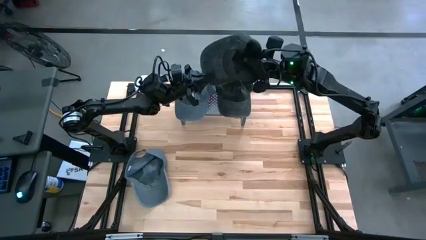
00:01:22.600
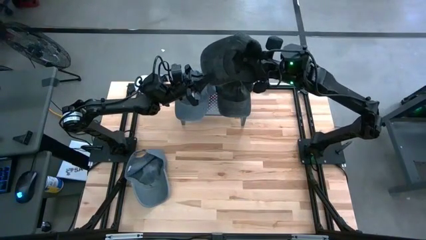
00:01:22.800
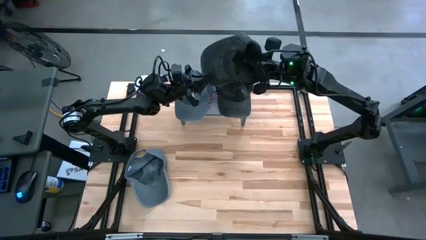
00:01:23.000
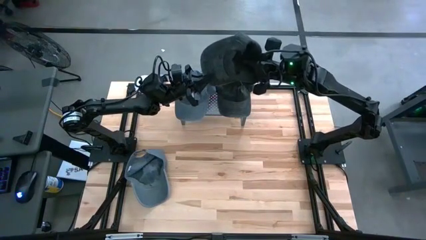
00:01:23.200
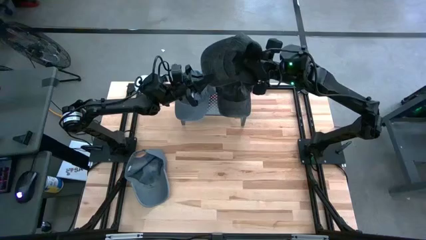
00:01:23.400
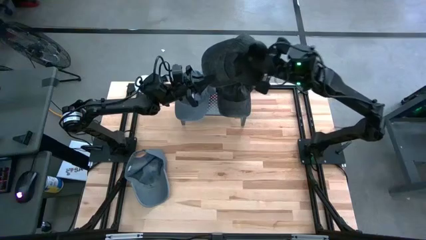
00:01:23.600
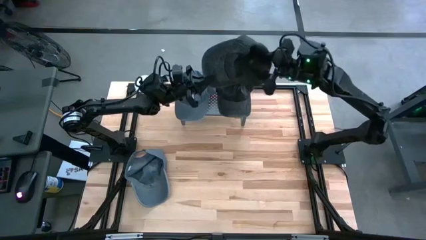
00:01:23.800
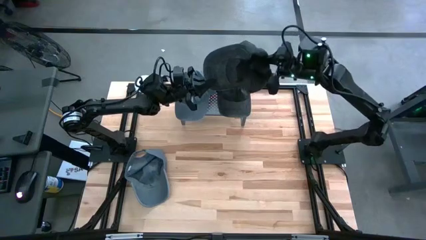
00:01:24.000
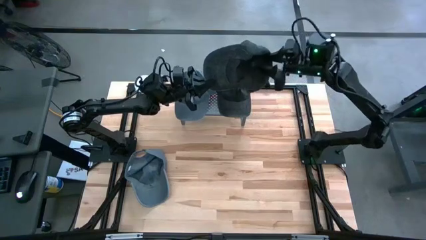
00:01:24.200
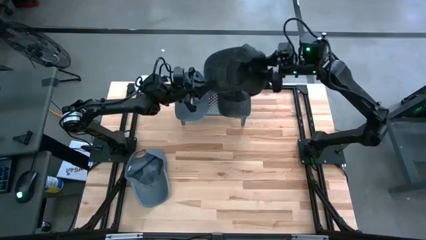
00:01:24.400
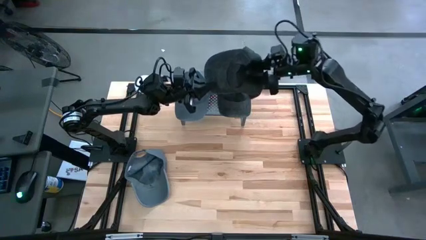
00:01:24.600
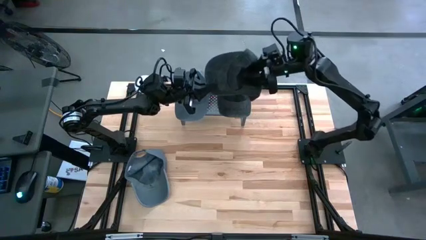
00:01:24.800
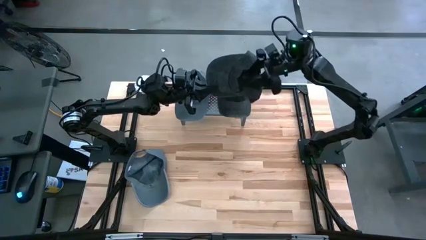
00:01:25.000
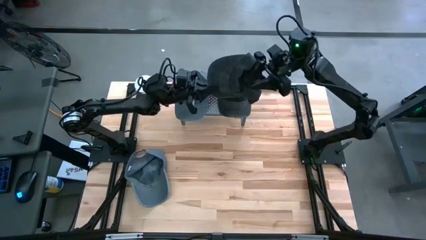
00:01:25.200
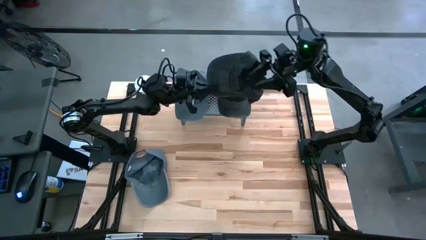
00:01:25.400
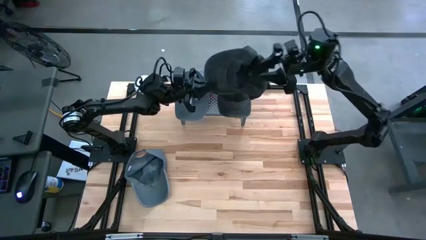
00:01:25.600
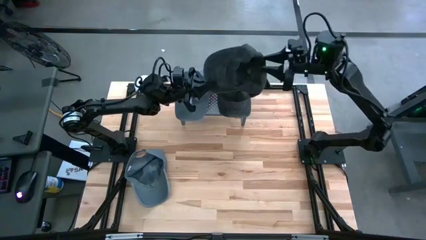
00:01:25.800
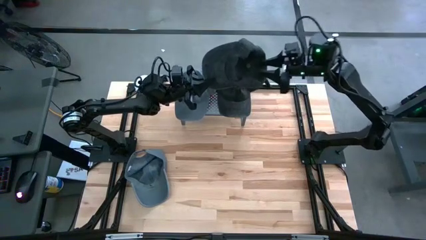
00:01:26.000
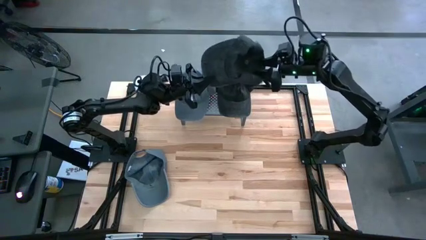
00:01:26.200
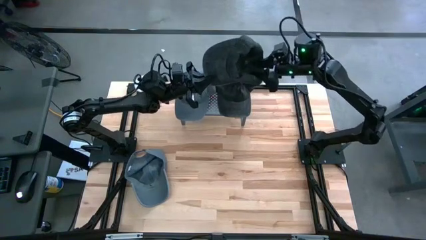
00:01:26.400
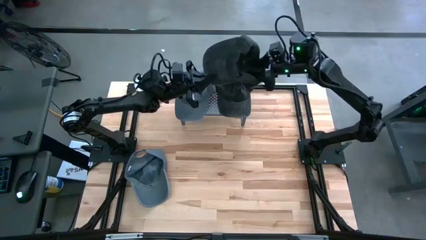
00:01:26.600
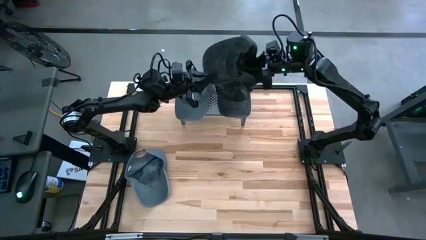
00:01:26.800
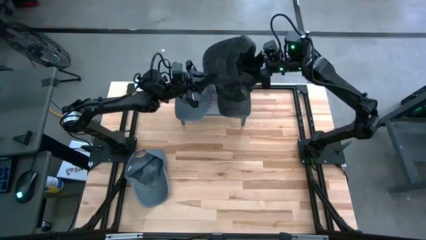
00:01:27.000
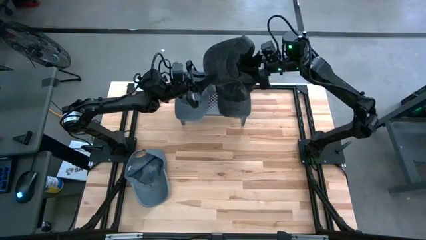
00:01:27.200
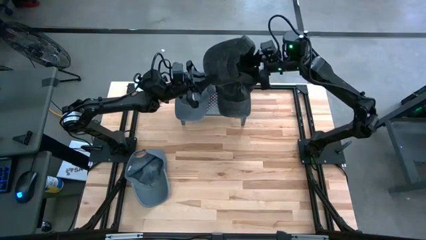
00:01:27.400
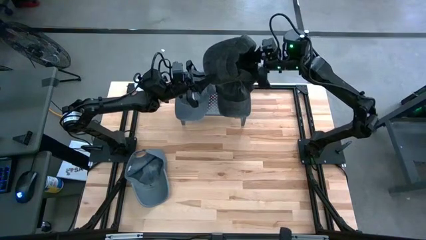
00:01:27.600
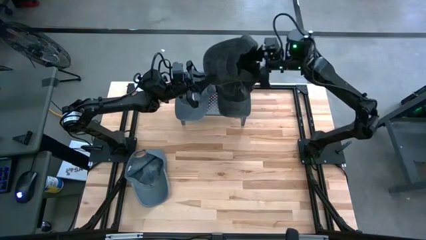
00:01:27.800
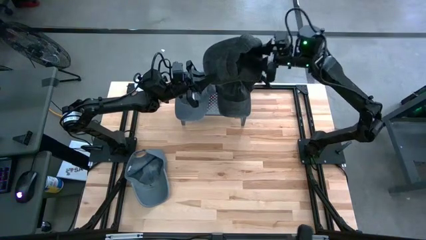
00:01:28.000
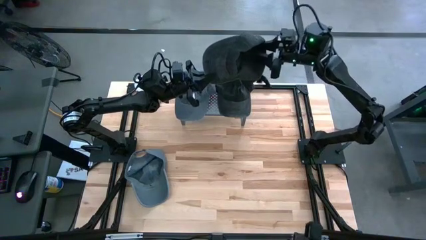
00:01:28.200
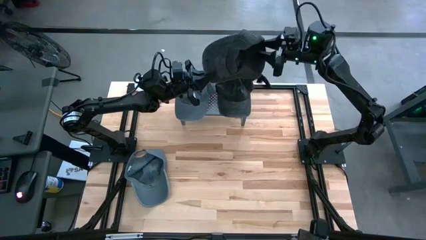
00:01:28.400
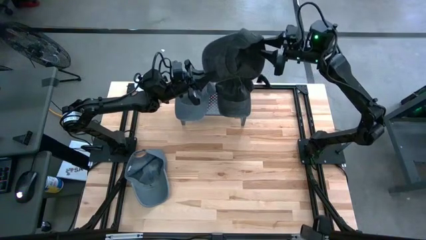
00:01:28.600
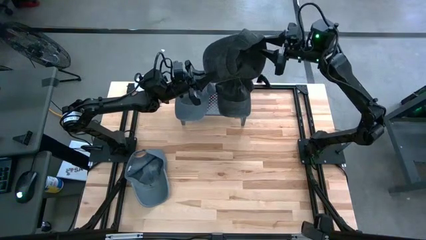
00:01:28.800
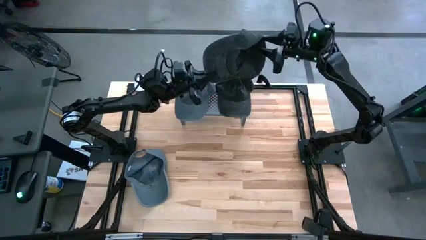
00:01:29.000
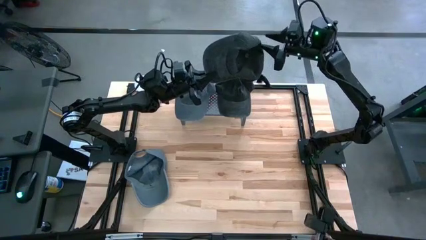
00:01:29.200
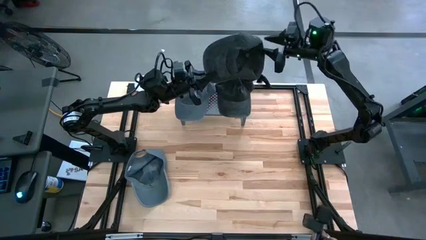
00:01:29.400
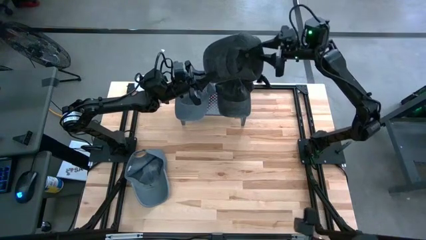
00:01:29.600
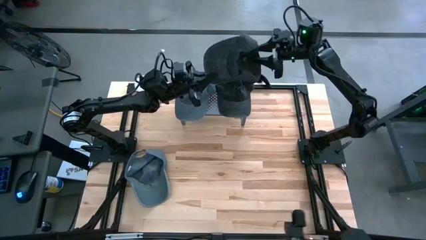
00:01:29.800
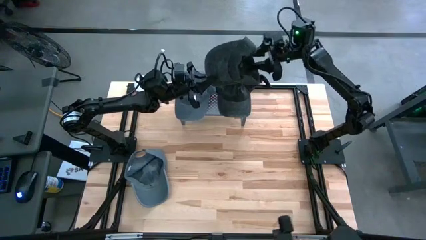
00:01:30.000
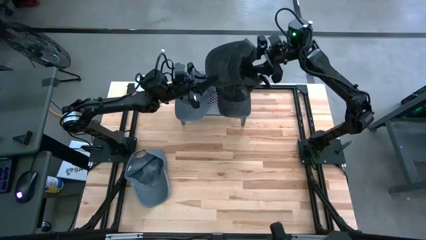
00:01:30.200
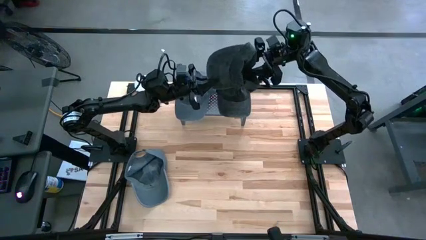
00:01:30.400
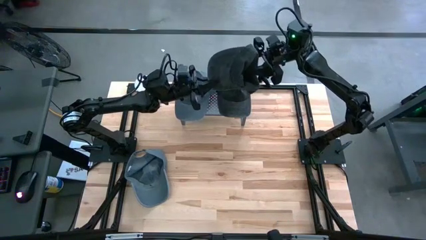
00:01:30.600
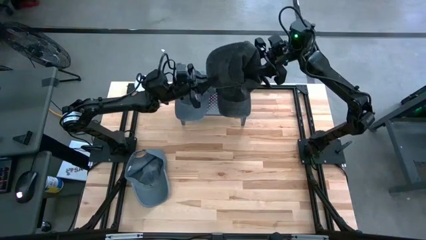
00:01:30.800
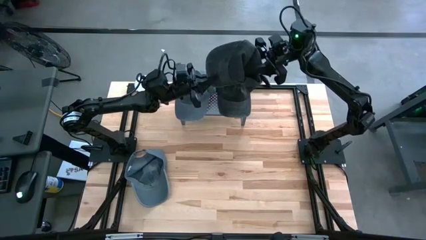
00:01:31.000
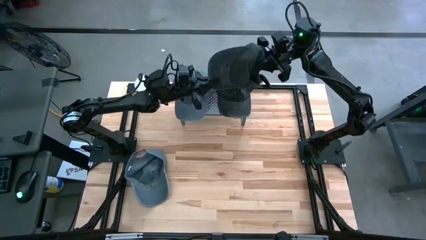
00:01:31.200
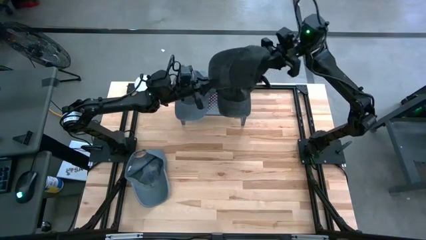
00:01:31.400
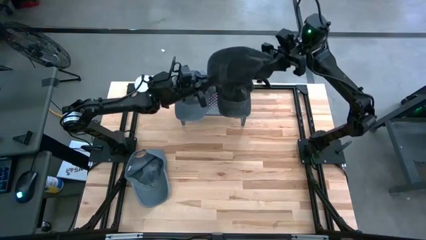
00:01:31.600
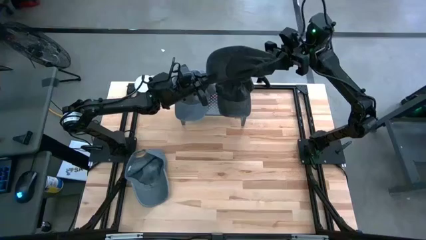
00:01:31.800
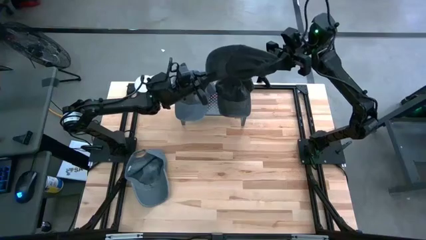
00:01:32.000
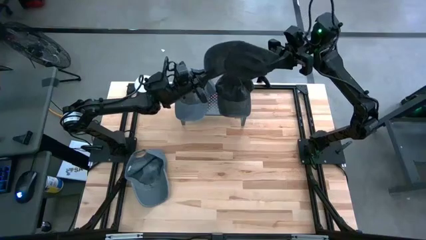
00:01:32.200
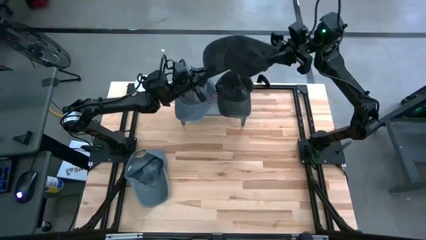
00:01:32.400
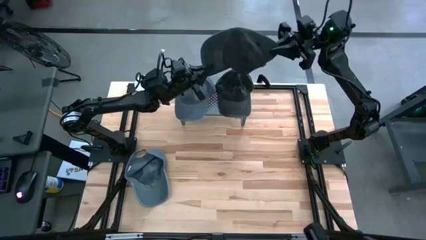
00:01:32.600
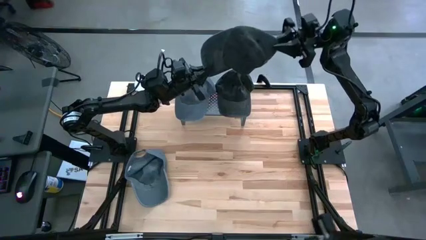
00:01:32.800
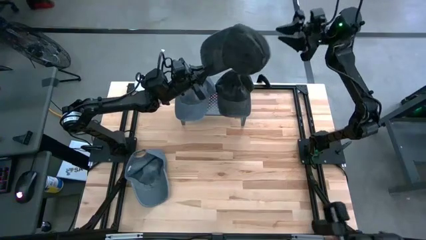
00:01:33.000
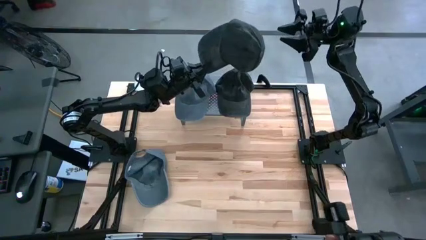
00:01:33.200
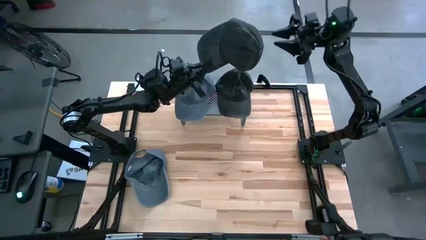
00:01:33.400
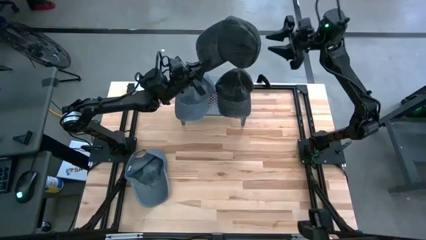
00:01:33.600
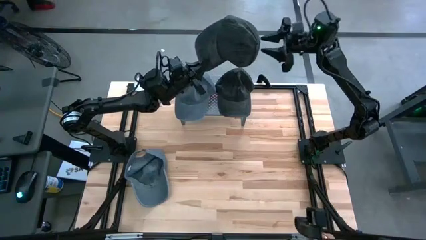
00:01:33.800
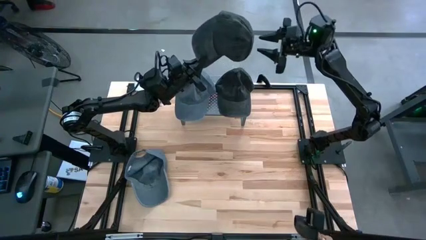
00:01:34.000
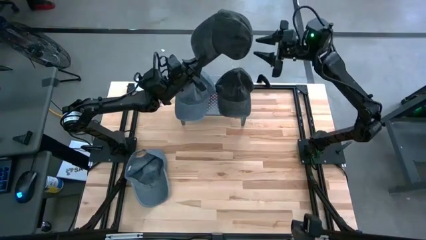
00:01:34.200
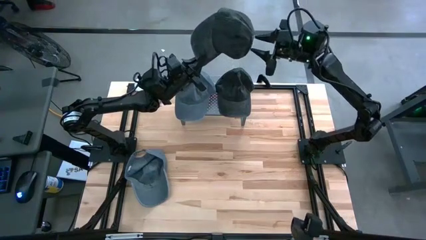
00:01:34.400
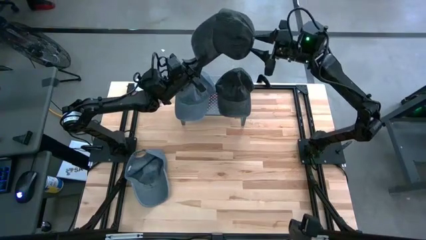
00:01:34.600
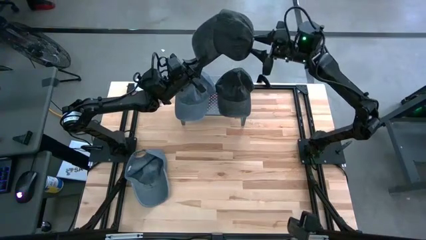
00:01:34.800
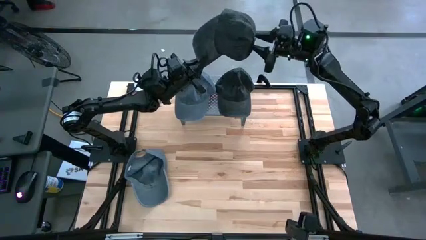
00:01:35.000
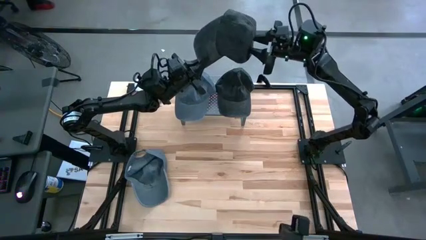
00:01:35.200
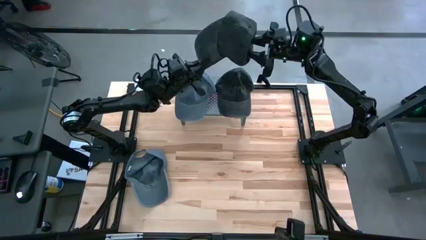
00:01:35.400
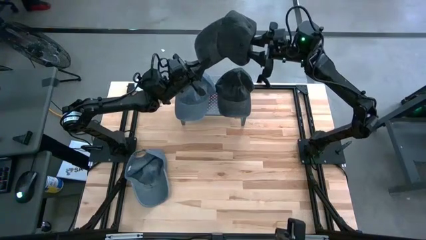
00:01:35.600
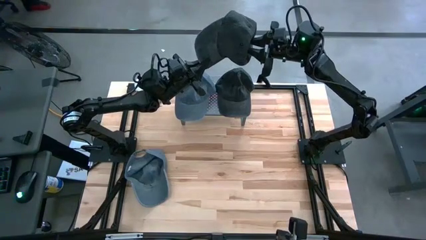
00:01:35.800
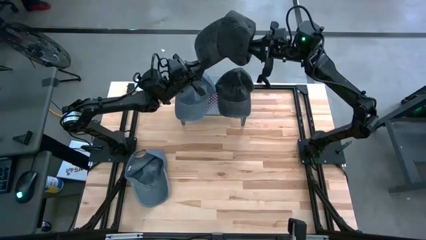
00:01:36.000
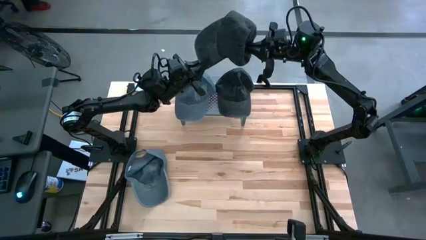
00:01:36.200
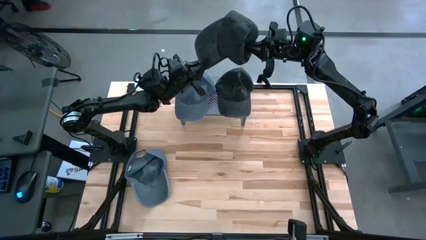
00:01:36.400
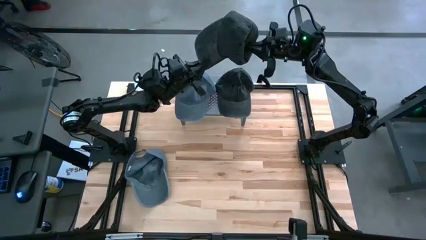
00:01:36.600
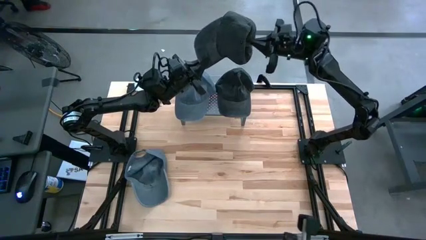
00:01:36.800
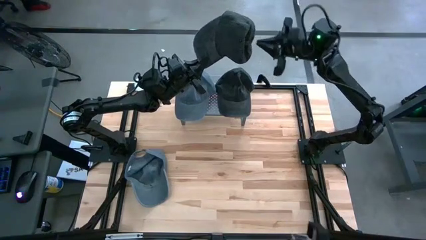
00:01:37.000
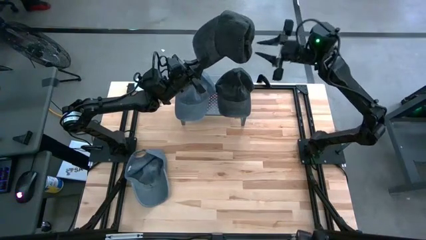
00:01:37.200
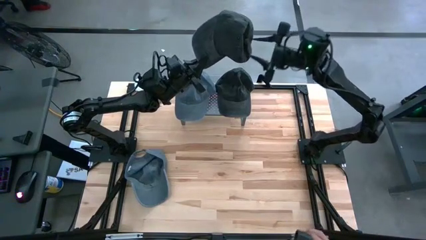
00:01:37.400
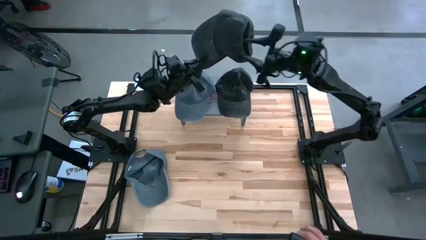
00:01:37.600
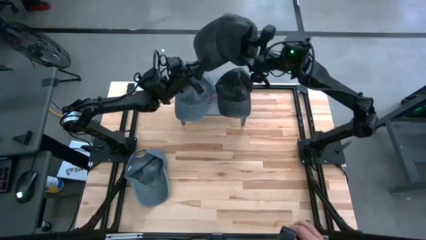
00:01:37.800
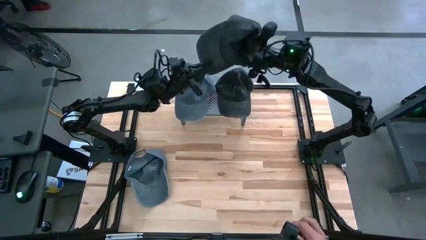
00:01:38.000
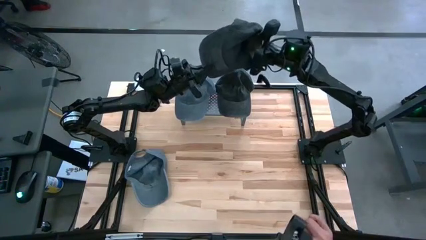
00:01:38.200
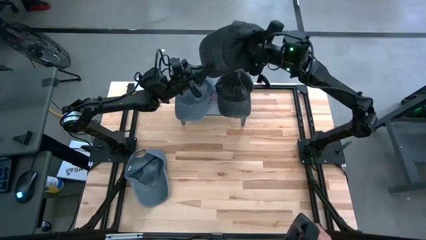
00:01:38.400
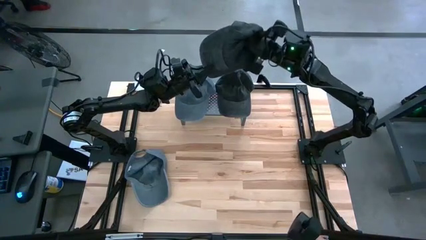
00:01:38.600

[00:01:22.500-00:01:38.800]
Task: Pick & Place hat
Stack the black cap on top of the other black cap on the shelf
